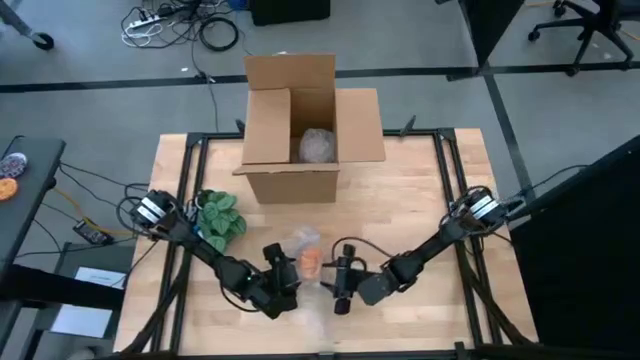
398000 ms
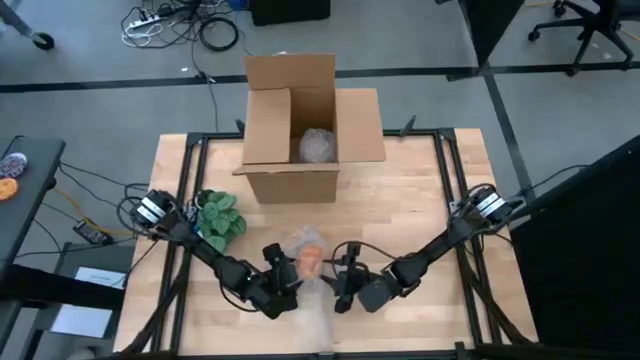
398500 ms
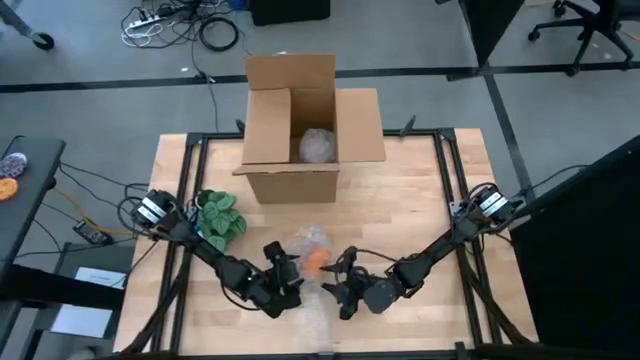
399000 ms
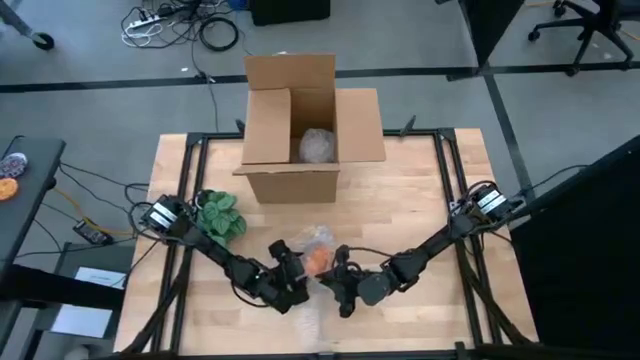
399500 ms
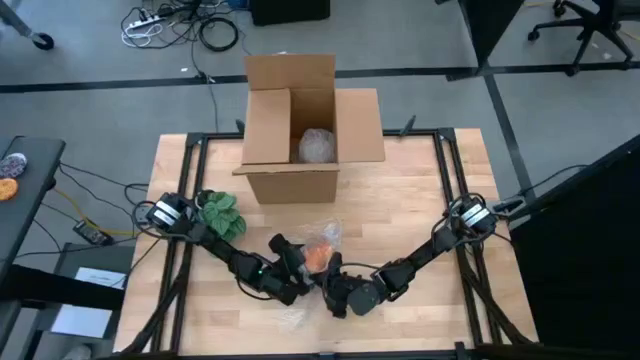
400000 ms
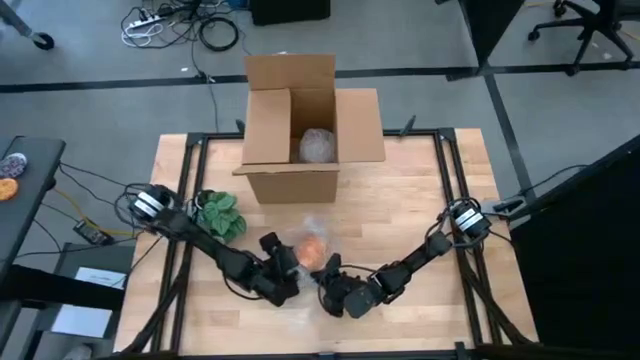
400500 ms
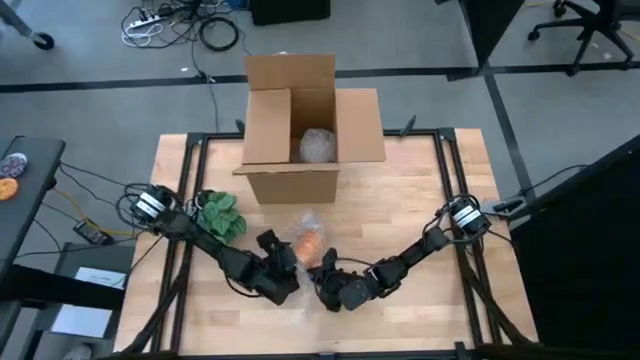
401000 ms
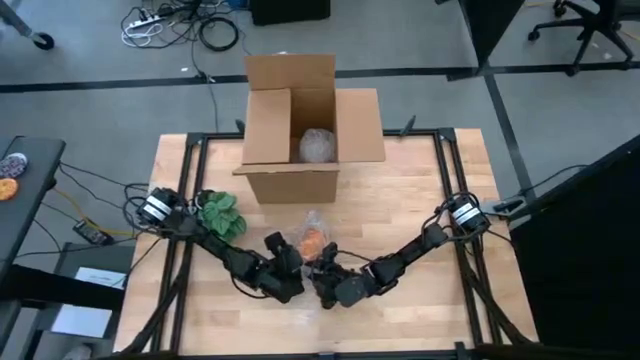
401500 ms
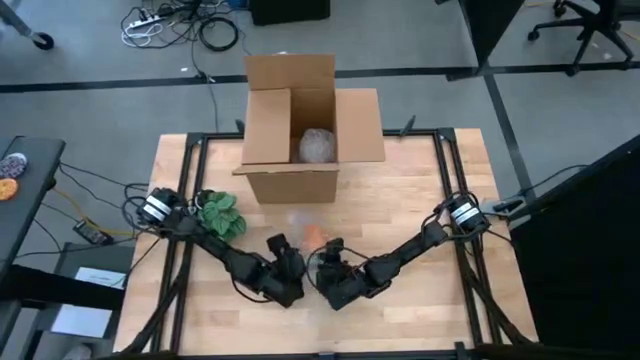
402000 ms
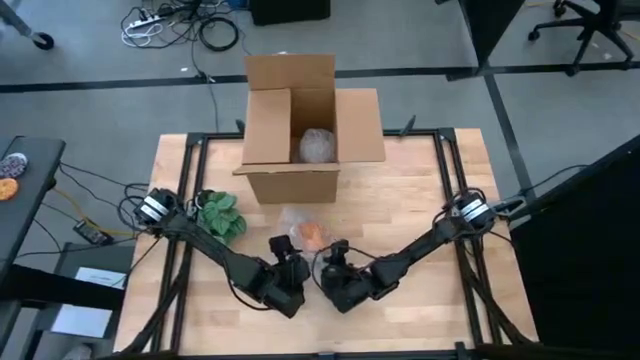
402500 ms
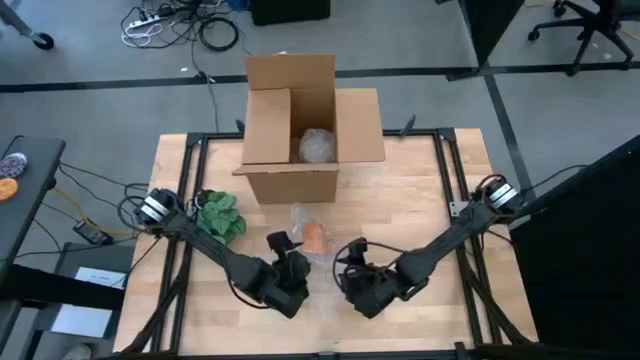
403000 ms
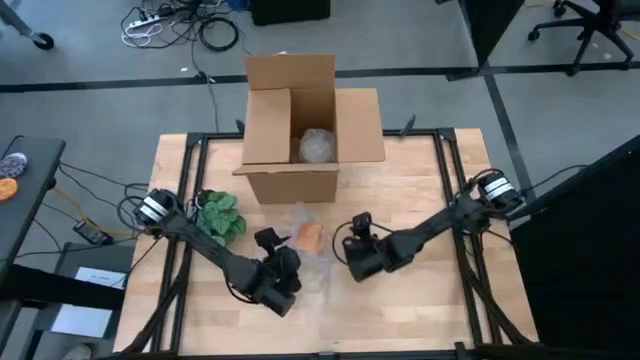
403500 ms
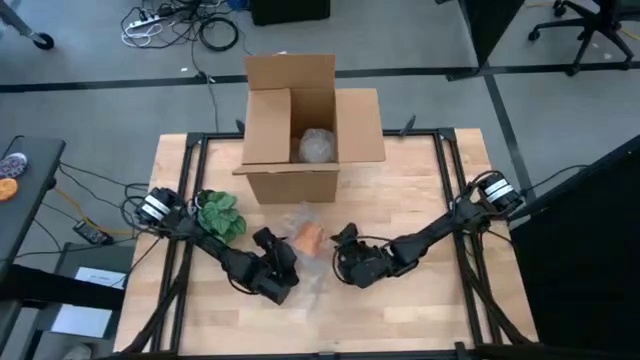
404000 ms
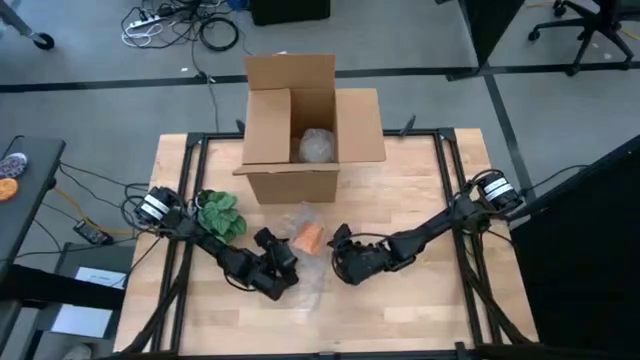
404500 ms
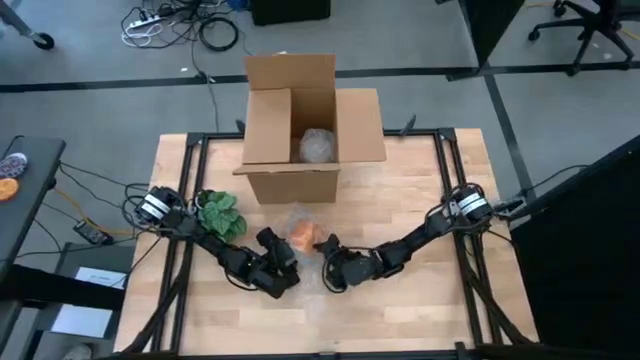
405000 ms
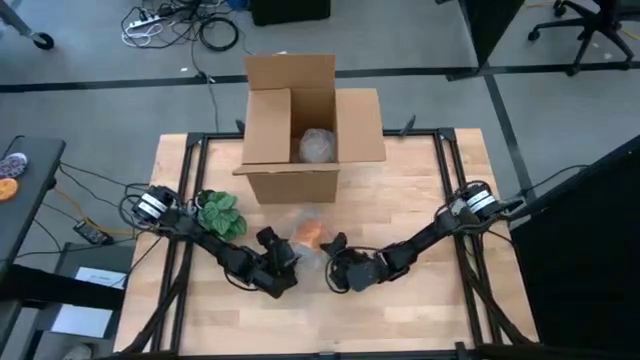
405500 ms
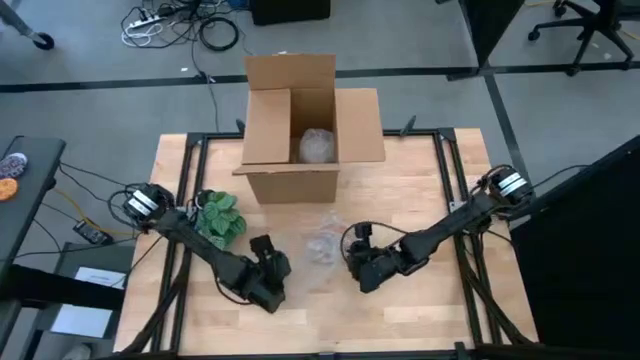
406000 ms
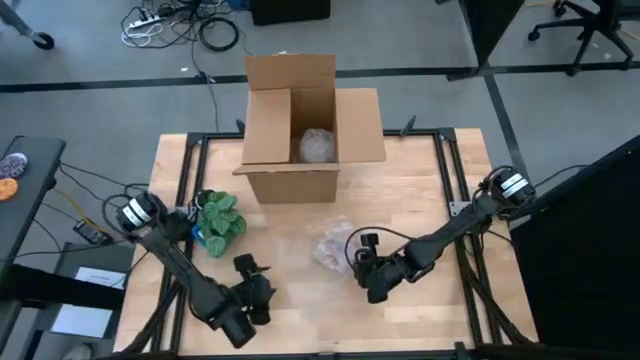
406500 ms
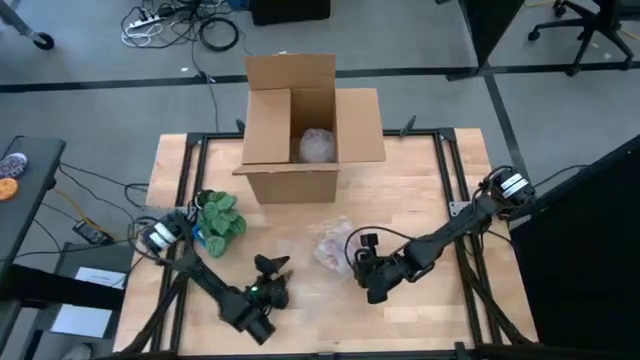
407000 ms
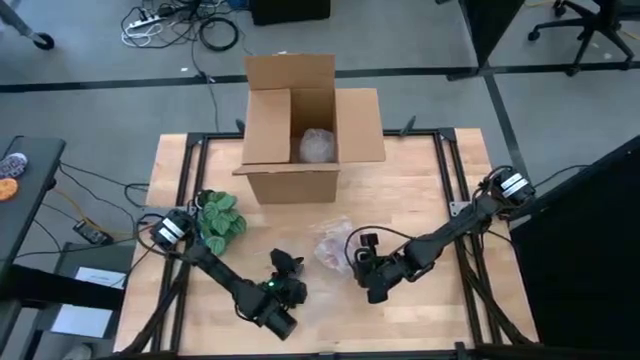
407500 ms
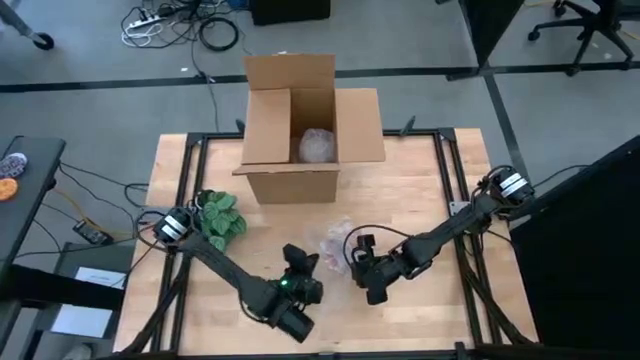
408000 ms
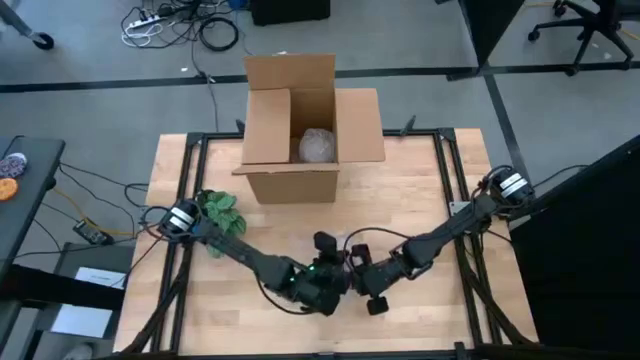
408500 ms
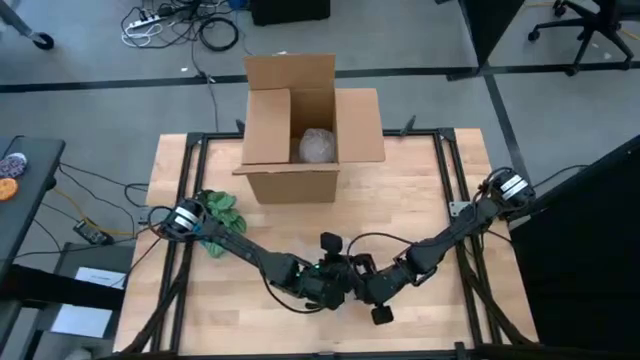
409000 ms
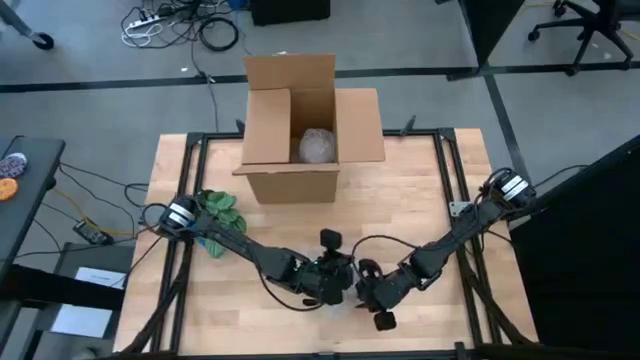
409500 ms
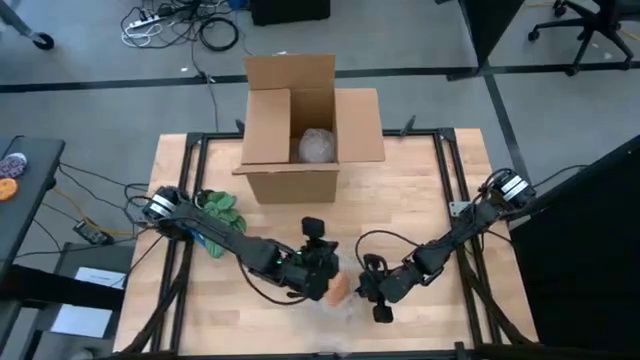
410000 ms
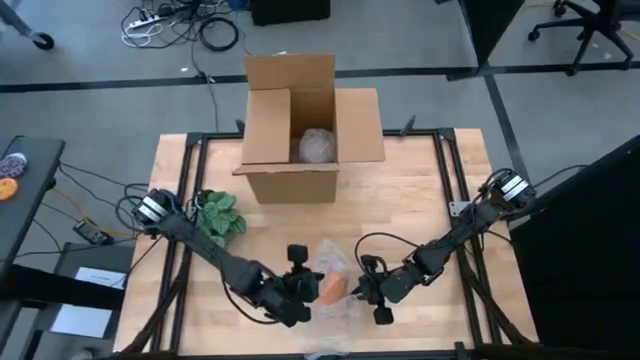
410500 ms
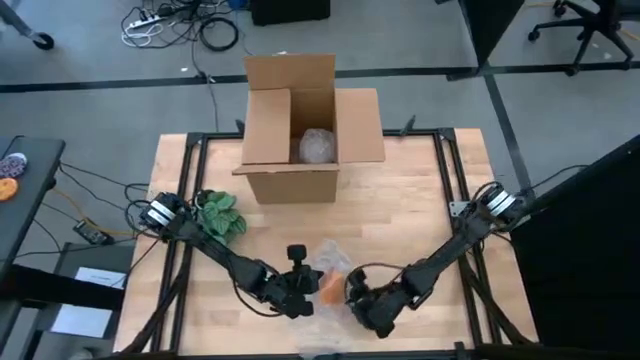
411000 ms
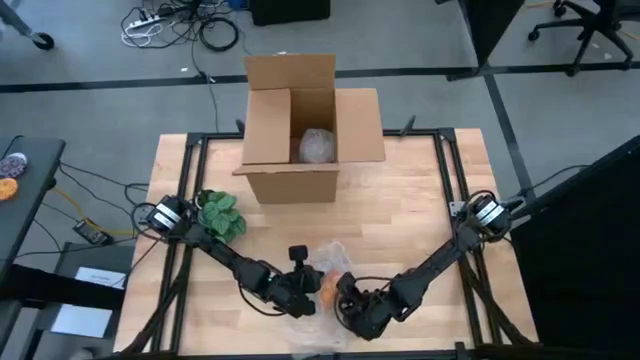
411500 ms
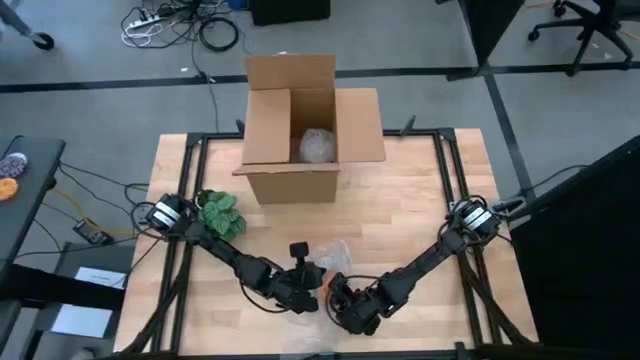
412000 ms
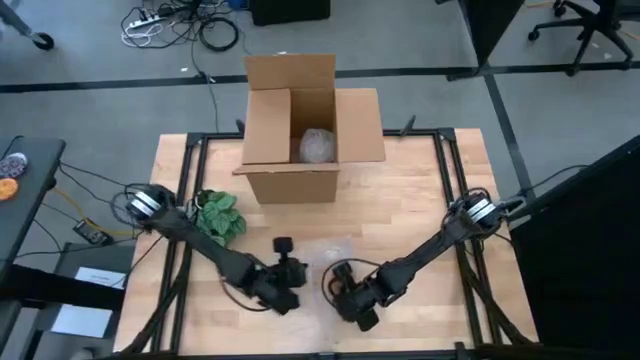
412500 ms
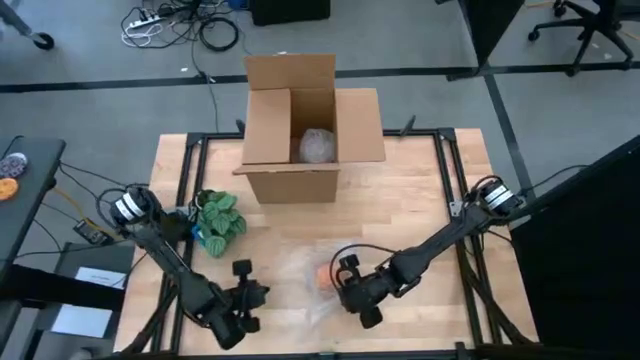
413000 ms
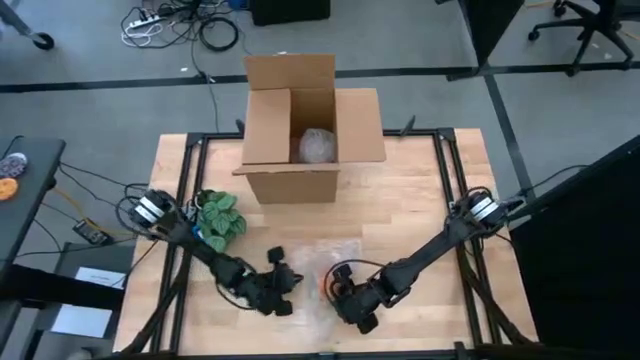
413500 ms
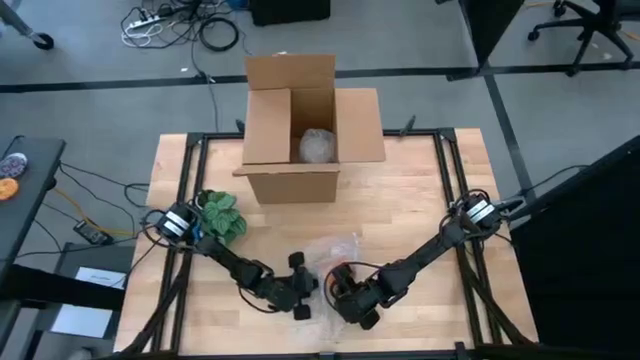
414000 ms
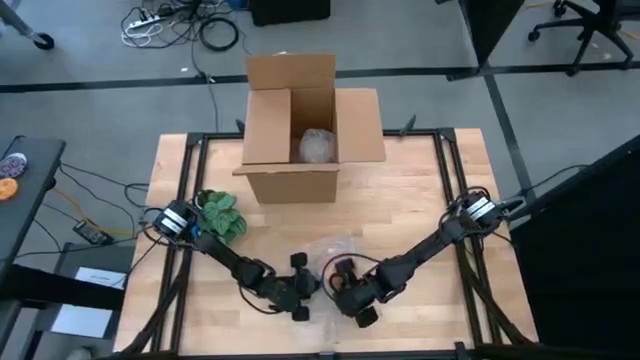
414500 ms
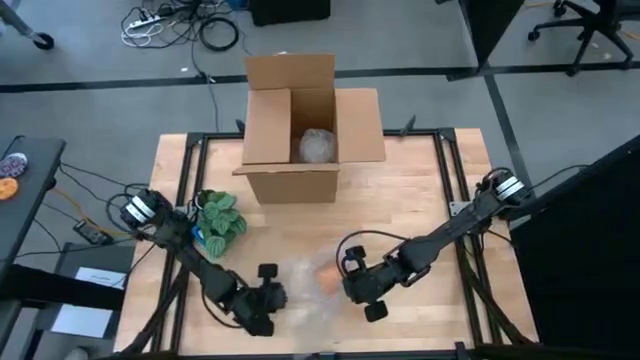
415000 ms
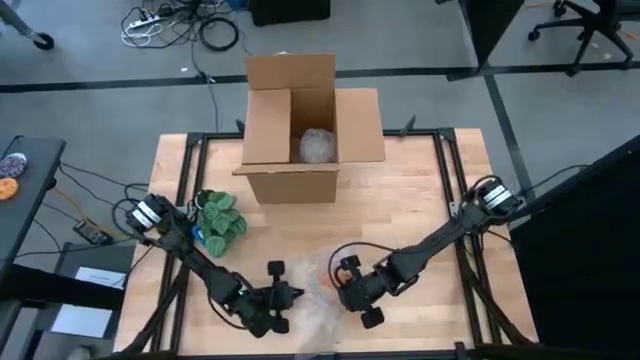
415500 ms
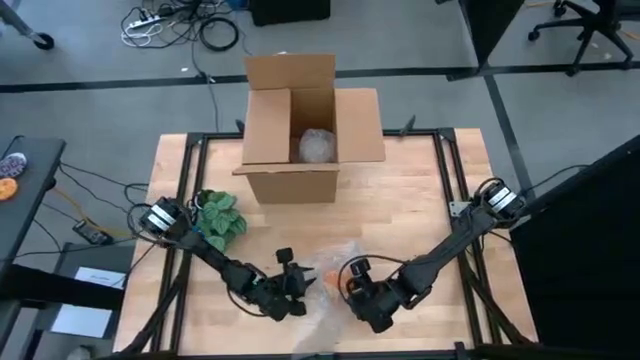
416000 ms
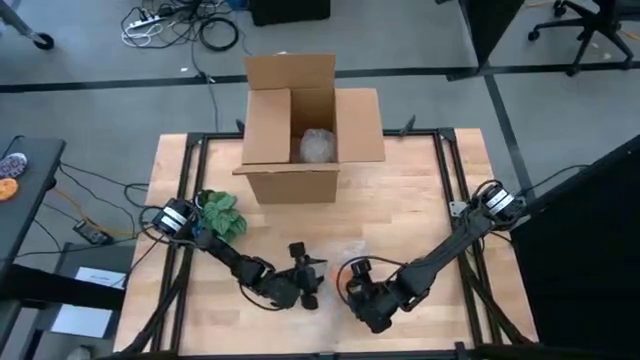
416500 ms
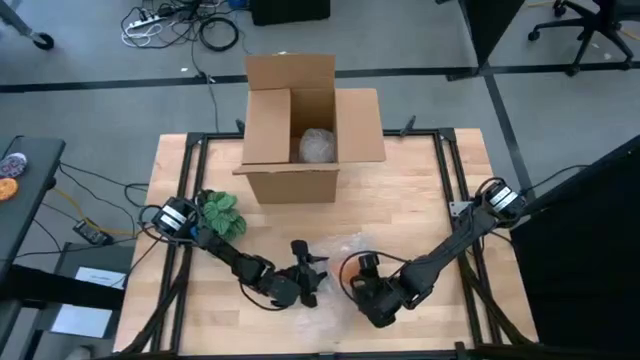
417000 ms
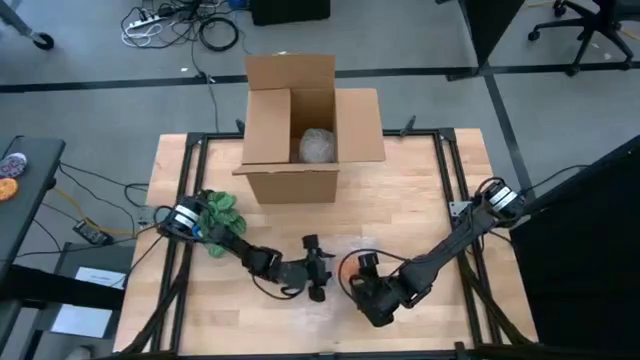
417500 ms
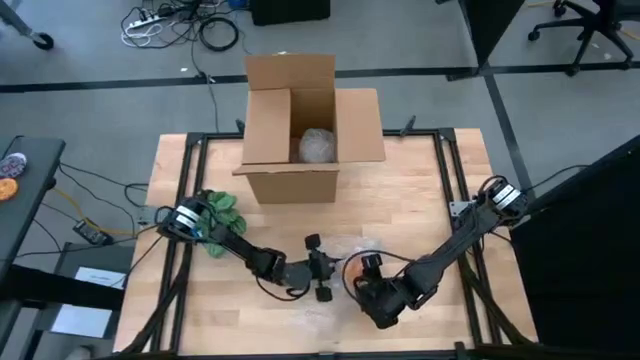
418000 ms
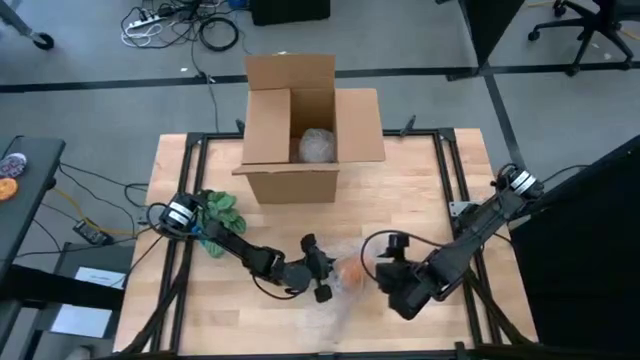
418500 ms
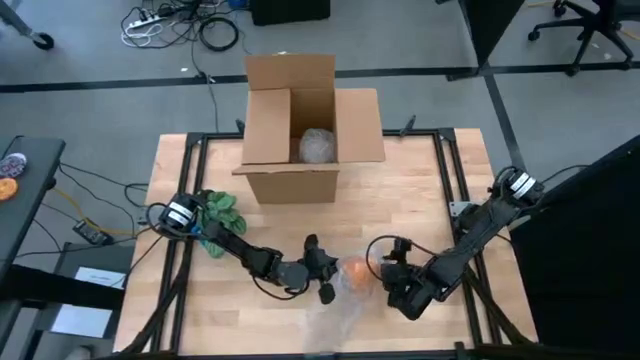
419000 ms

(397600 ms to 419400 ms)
Task: wrap mug
Wrap the orange mug with the bubble wrap
